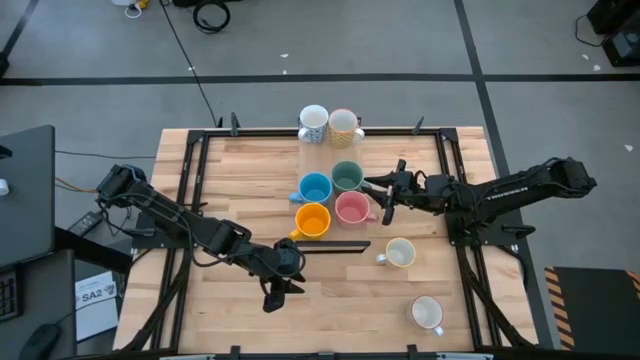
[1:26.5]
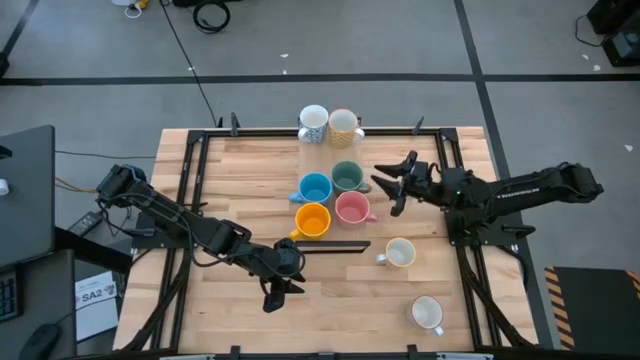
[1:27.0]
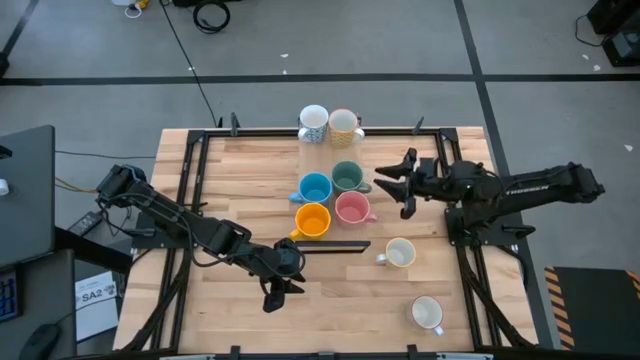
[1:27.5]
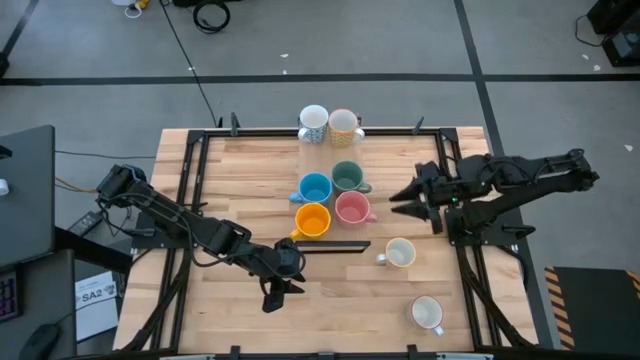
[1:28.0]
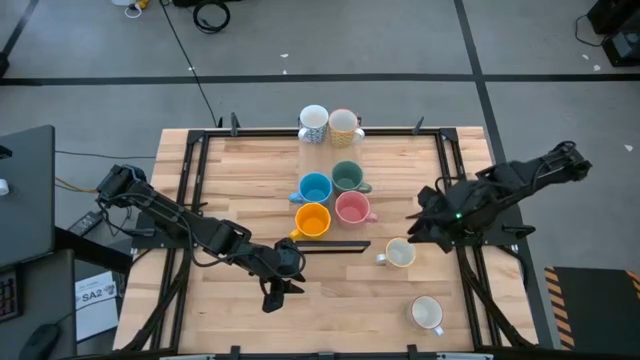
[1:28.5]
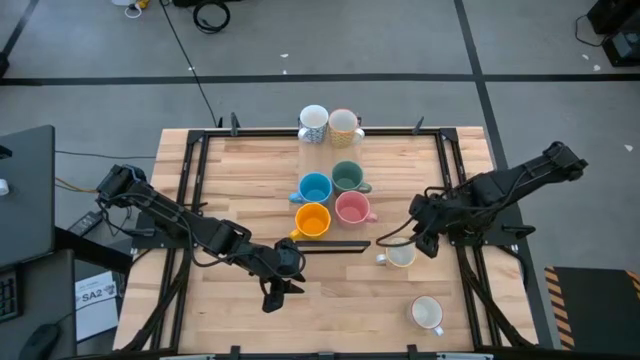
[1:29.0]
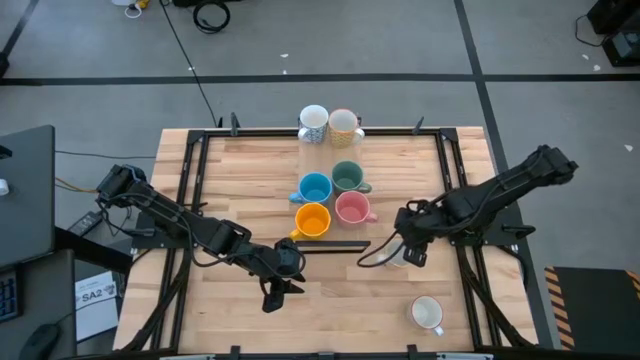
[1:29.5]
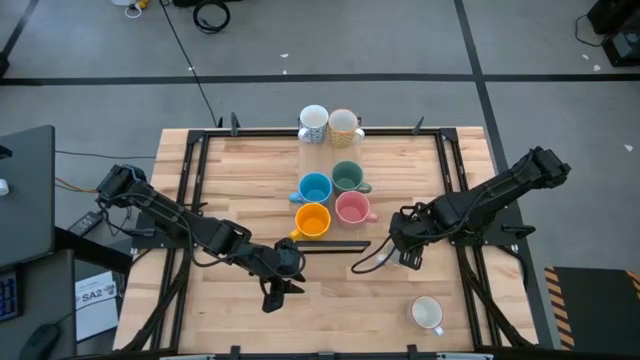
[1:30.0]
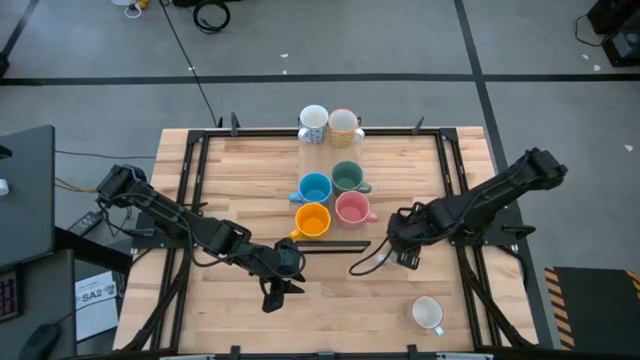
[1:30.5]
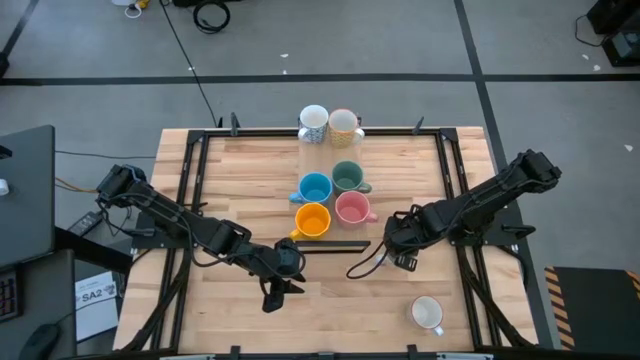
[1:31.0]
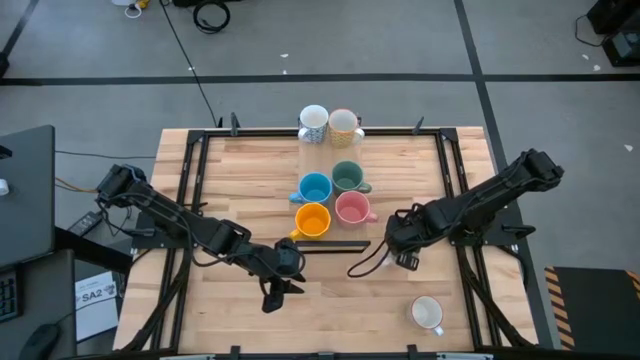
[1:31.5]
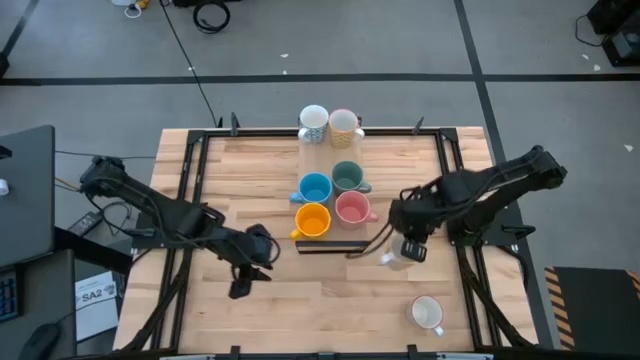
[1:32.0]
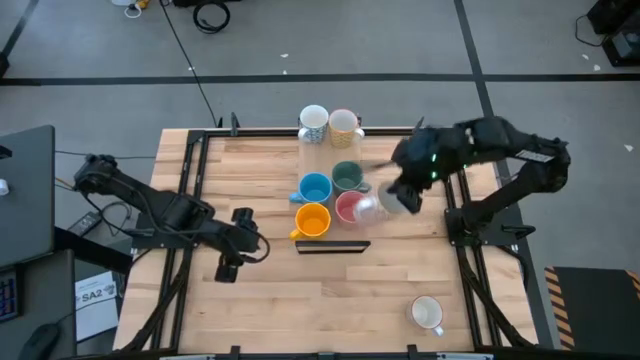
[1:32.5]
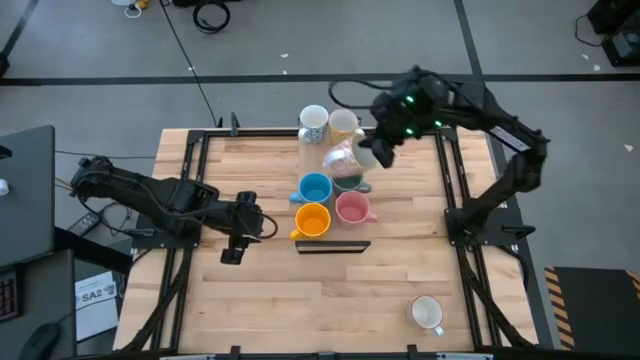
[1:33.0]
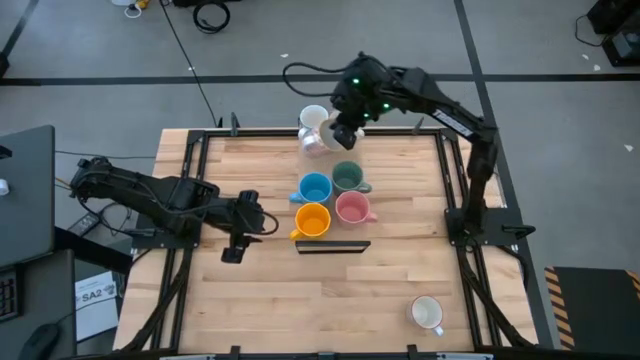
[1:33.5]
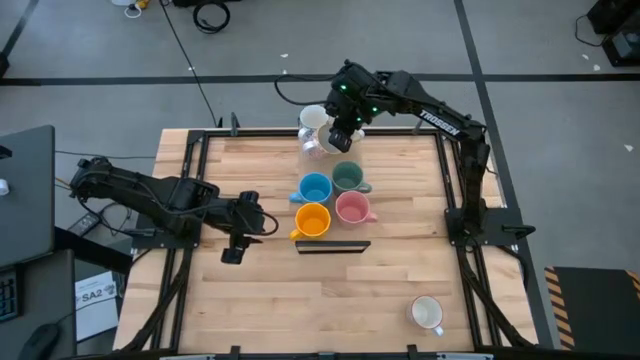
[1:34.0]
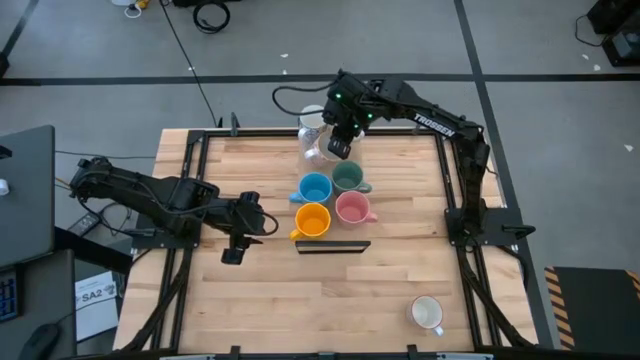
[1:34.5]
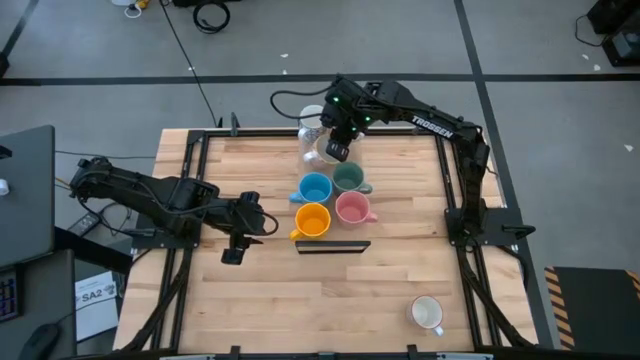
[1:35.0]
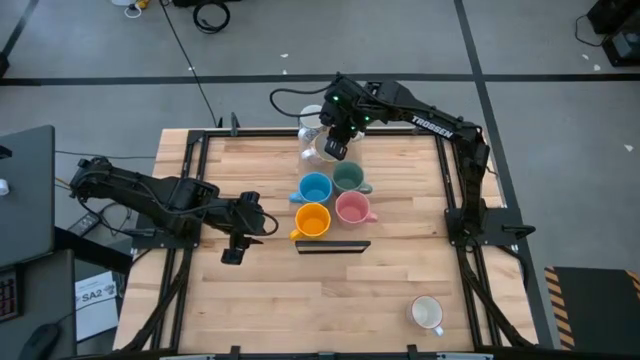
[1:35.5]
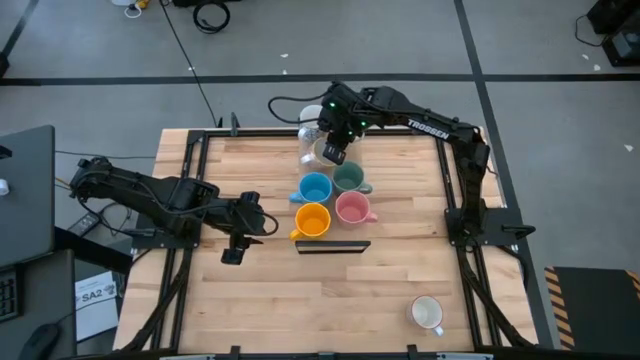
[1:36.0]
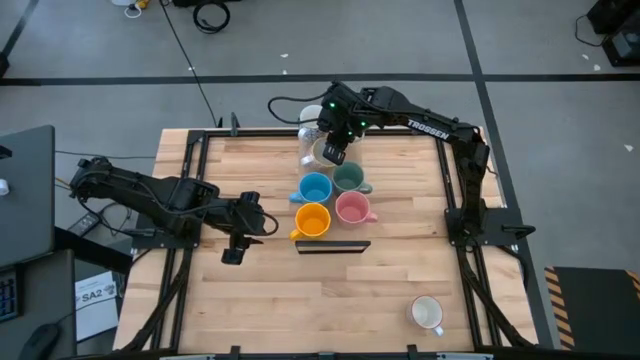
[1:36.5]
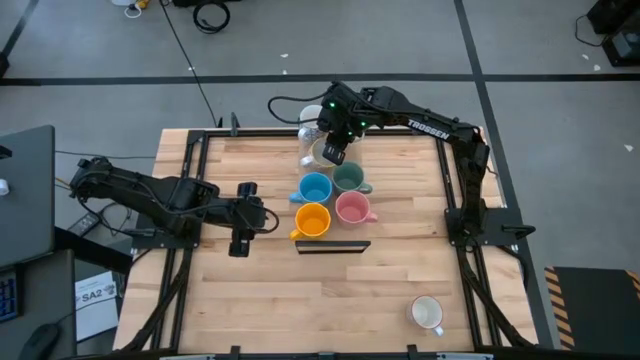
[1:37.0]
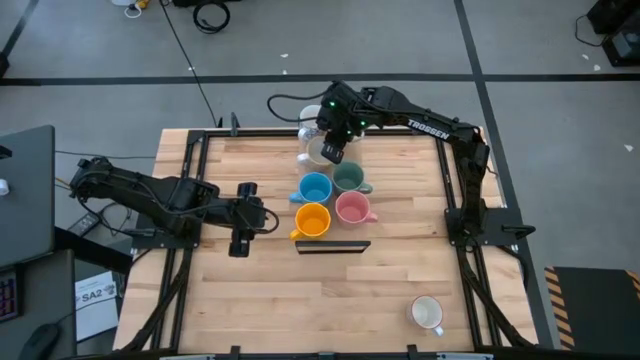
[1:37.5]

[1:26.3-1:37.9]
Task: Place coffee mugs
Put the yellow patterned mug on the shelf

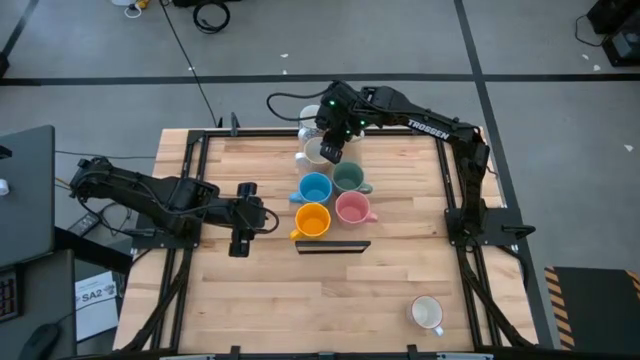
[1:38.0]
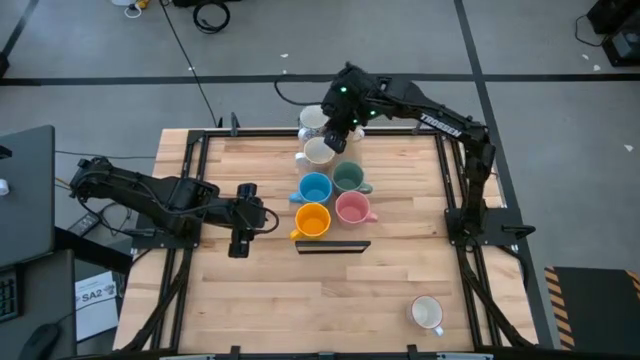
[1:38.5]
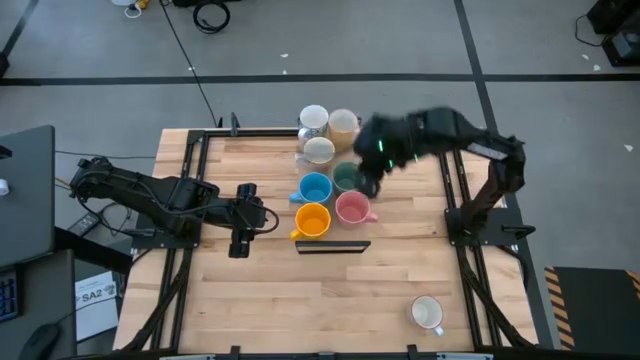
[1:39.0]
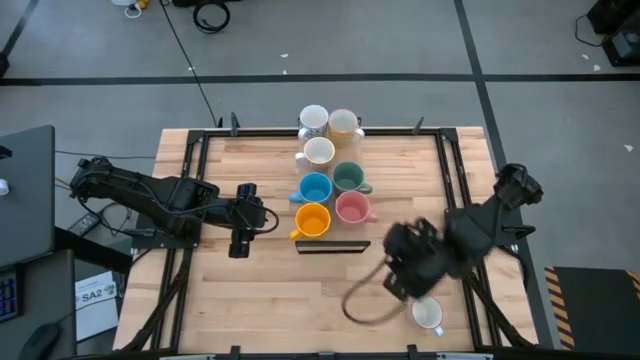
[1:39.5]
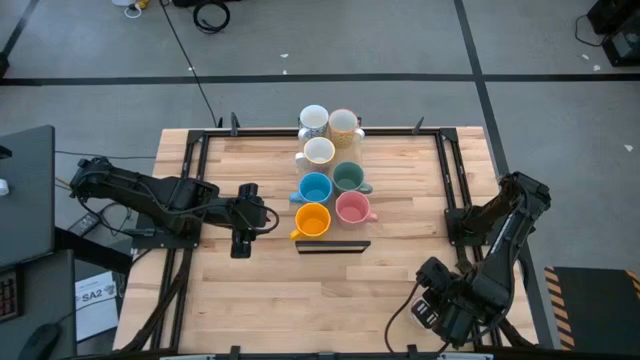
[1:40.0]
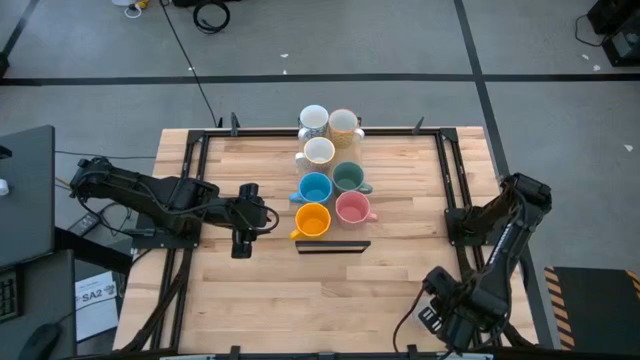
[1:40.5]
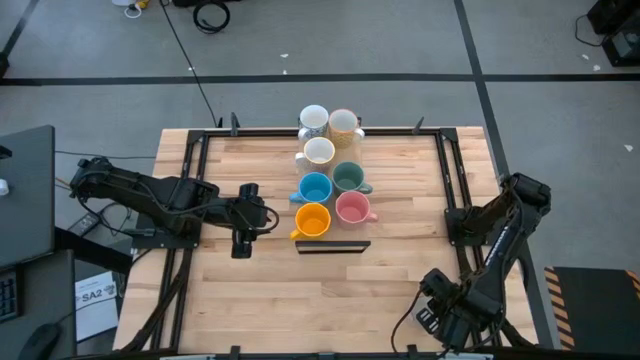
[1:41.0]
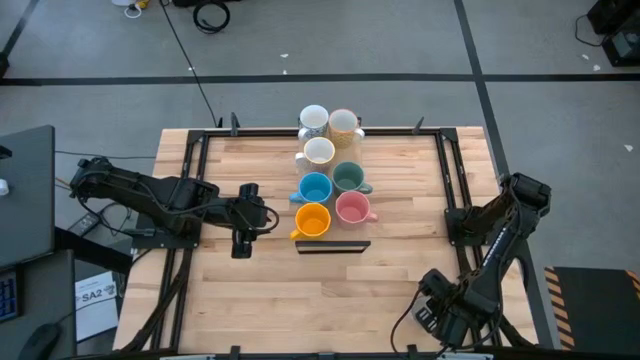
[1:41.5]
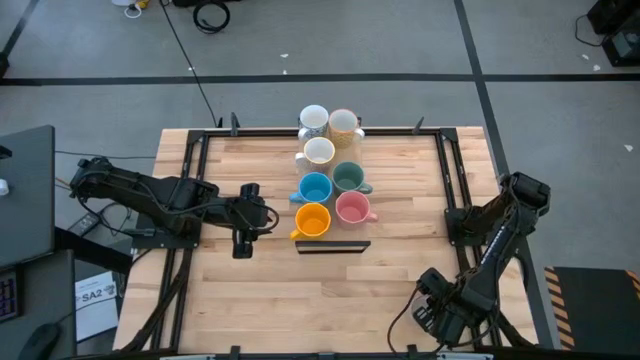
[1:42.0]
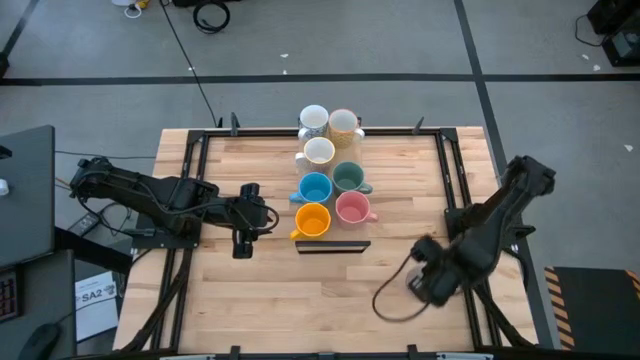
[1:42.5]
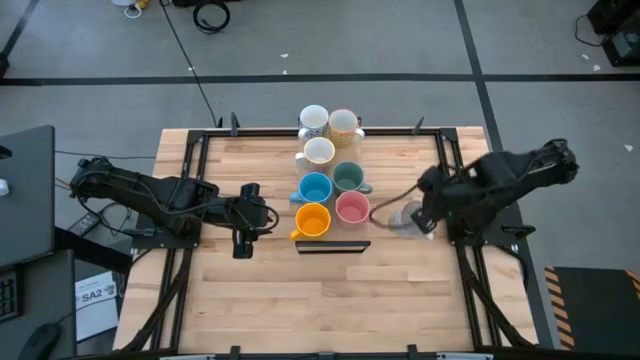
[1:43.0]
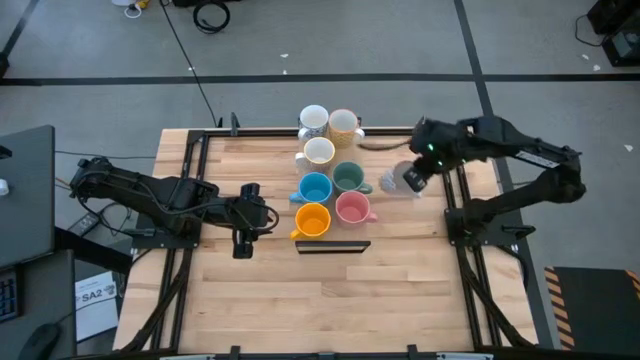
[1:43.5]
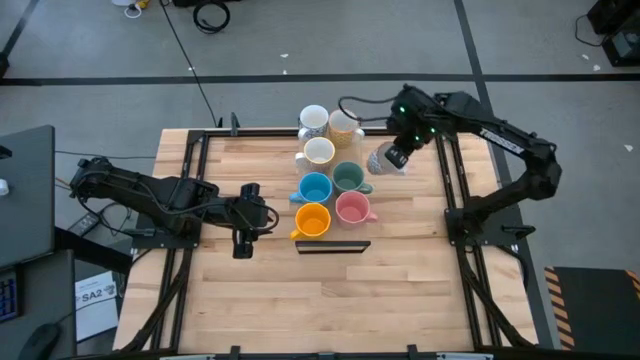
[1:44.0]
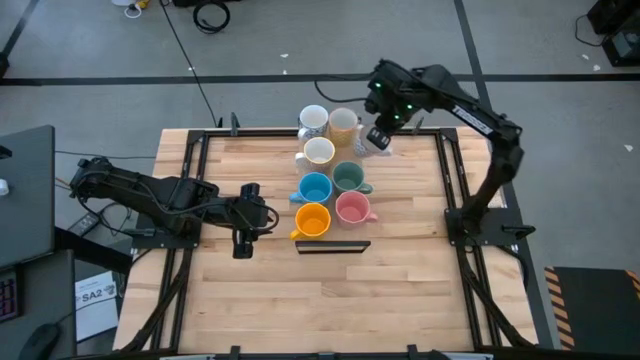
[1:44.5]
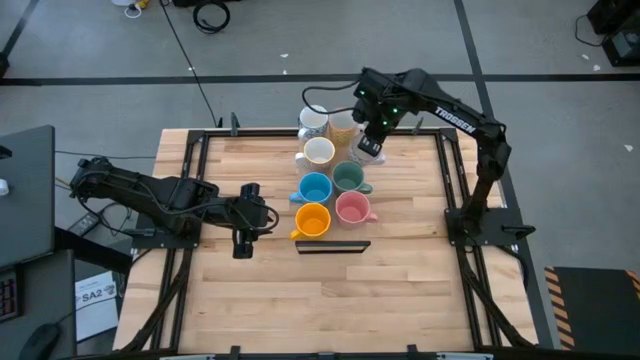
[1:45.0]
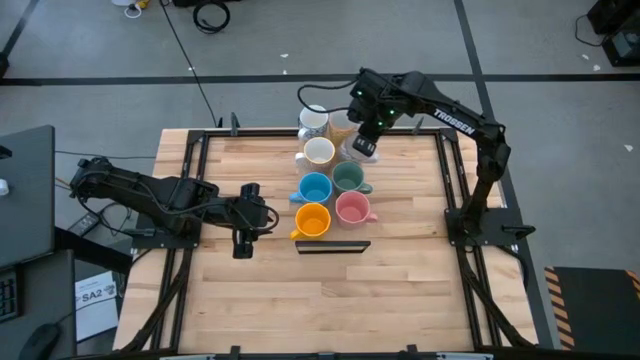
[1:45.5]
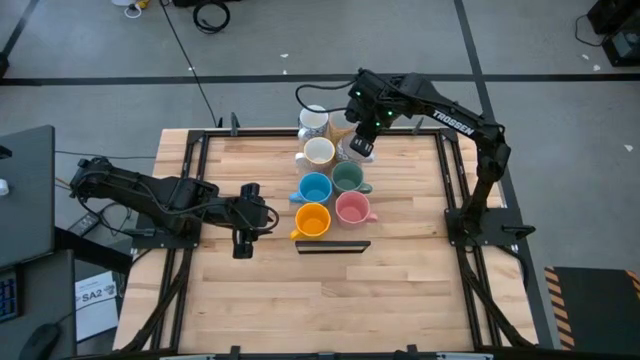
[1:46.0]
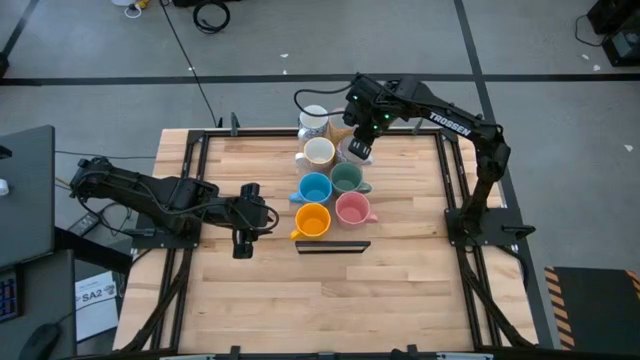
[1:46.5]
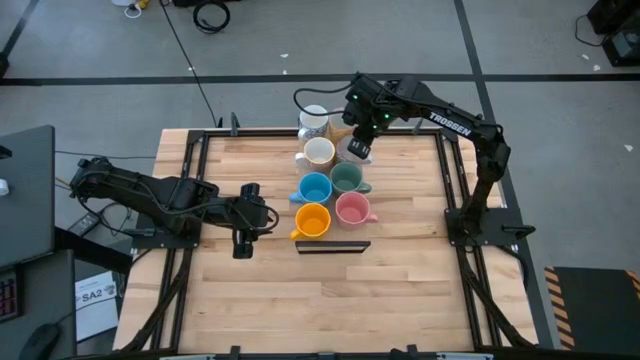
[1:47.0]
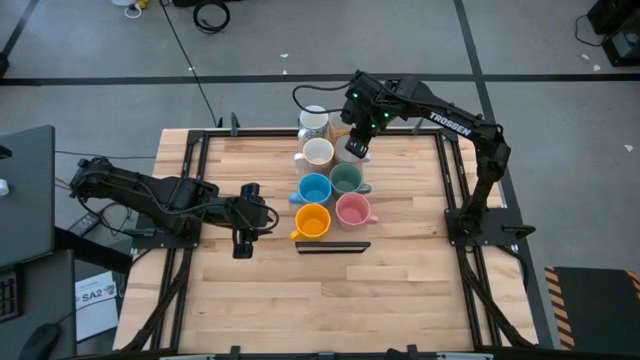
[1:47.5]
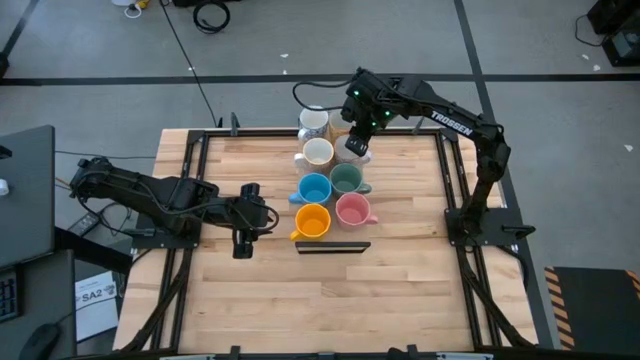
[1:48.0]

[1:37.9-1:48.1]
Put the red patterned mug on the shelf
